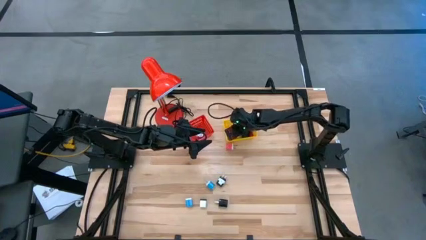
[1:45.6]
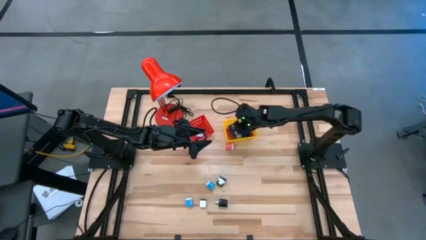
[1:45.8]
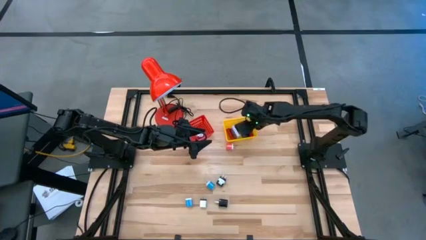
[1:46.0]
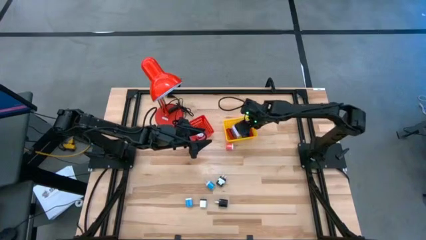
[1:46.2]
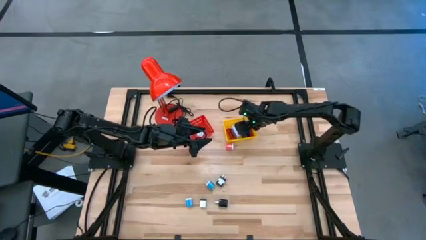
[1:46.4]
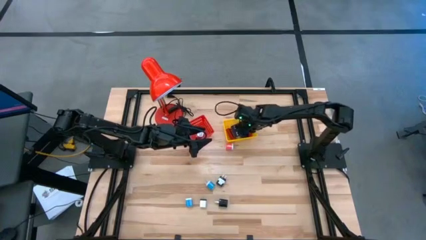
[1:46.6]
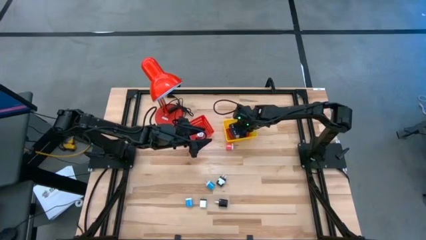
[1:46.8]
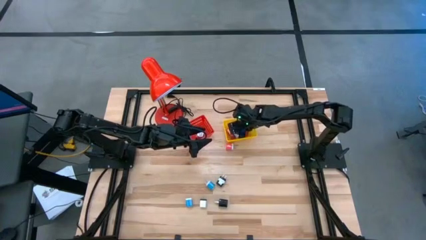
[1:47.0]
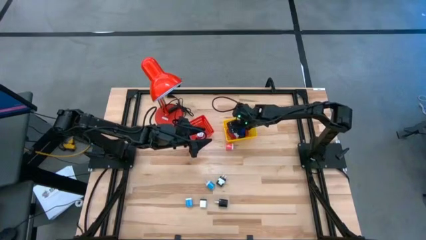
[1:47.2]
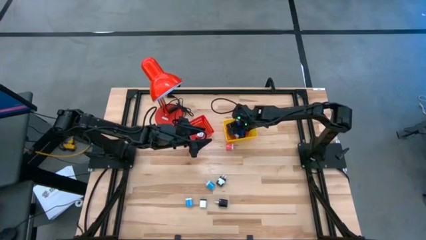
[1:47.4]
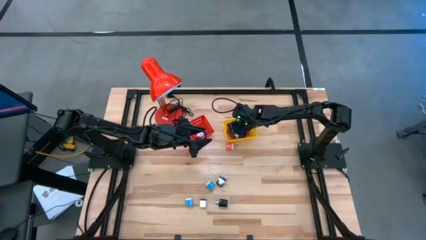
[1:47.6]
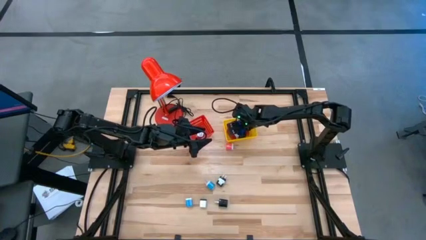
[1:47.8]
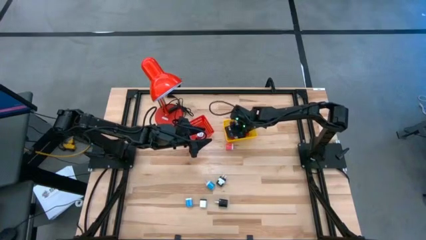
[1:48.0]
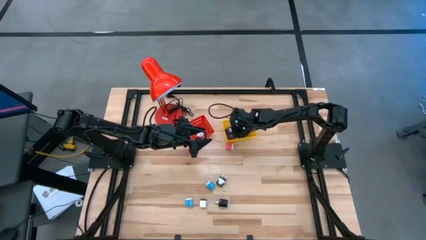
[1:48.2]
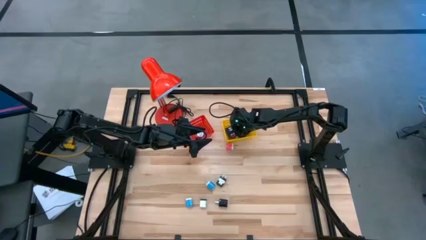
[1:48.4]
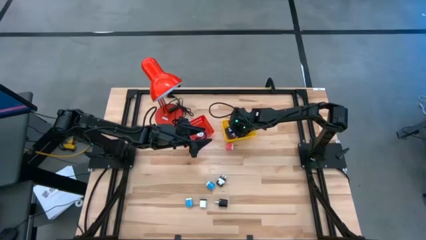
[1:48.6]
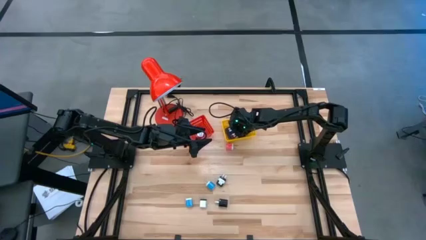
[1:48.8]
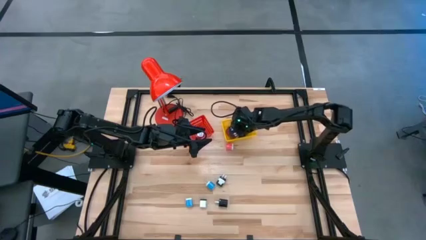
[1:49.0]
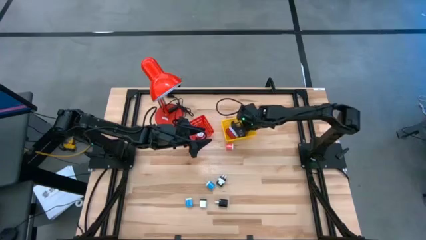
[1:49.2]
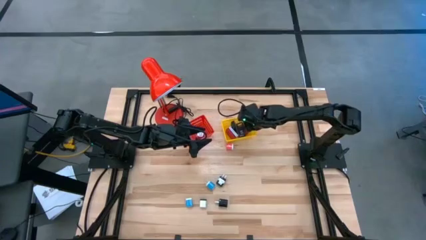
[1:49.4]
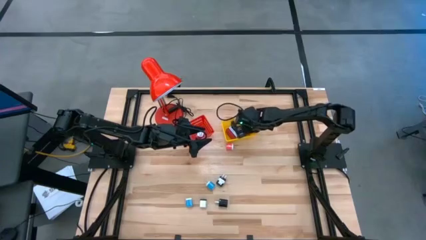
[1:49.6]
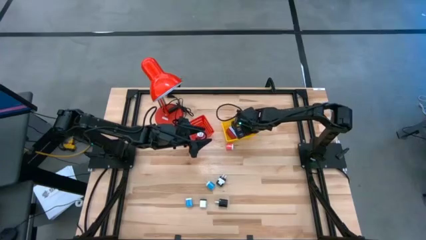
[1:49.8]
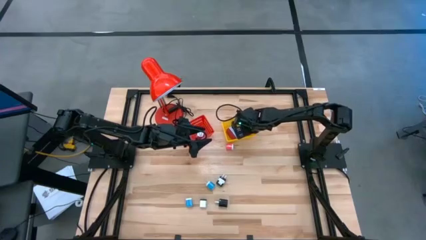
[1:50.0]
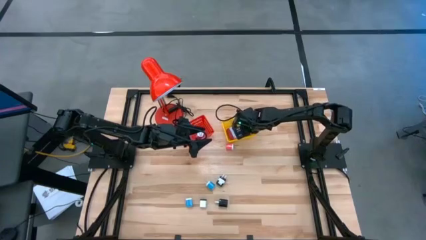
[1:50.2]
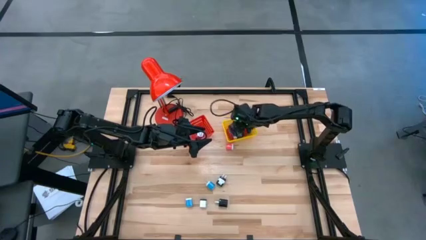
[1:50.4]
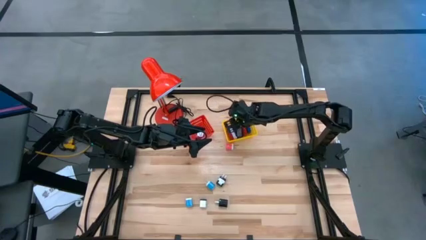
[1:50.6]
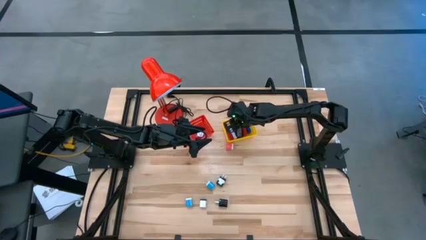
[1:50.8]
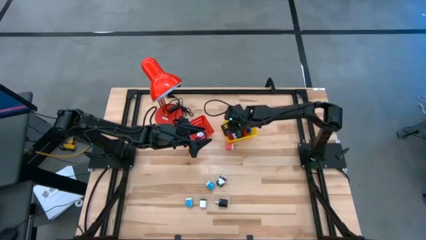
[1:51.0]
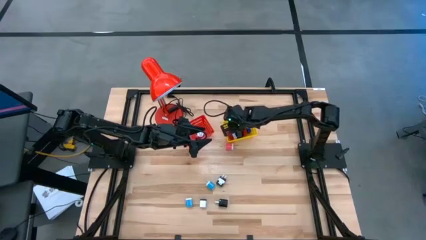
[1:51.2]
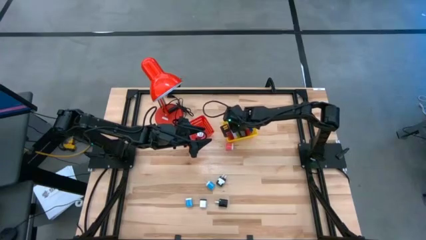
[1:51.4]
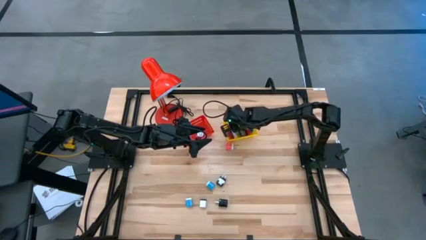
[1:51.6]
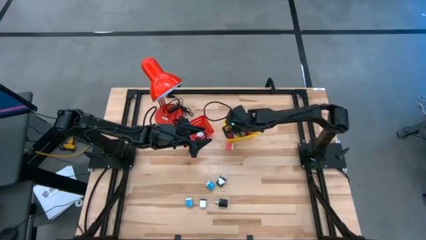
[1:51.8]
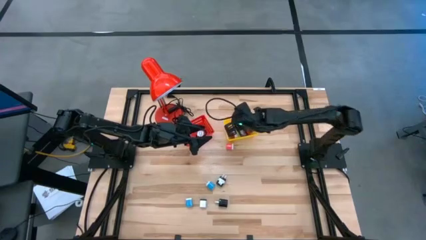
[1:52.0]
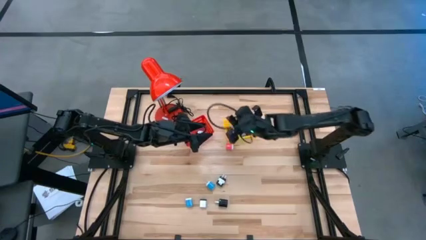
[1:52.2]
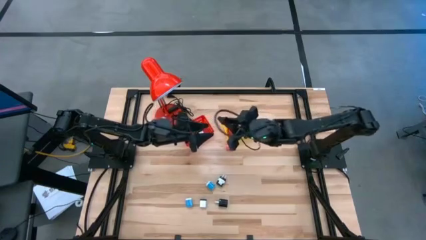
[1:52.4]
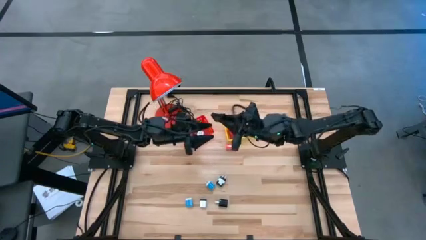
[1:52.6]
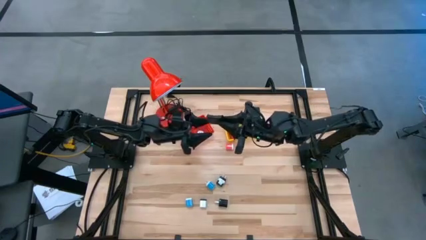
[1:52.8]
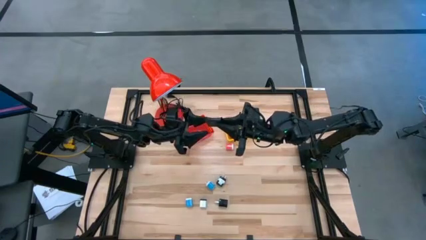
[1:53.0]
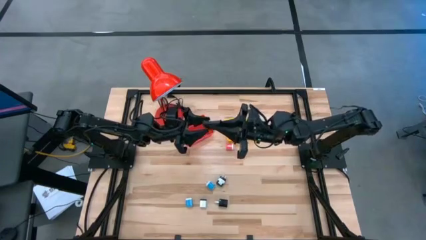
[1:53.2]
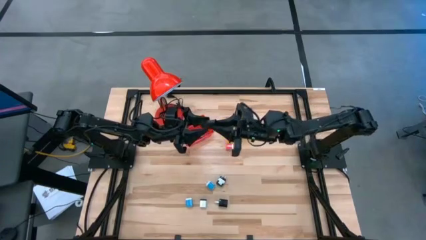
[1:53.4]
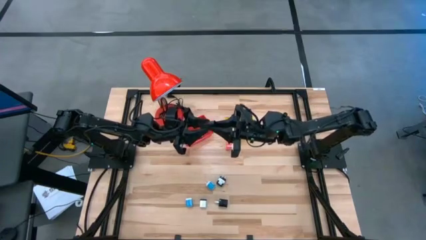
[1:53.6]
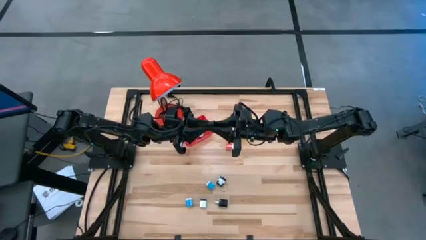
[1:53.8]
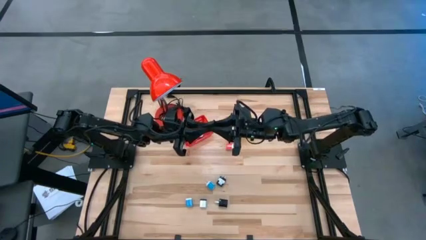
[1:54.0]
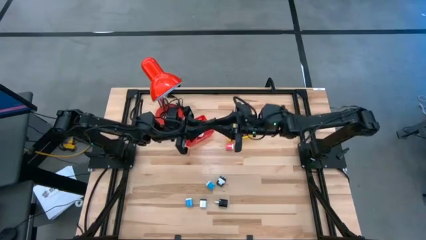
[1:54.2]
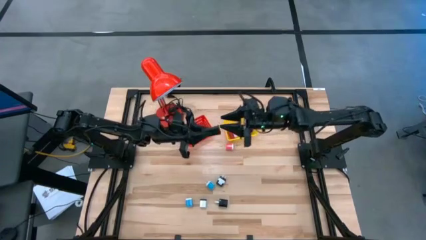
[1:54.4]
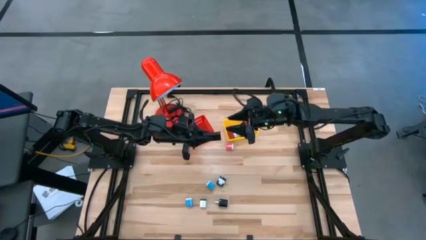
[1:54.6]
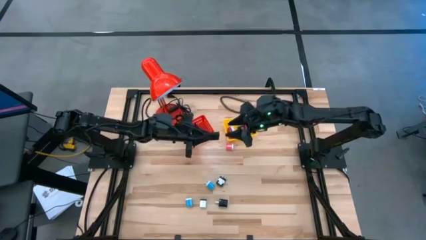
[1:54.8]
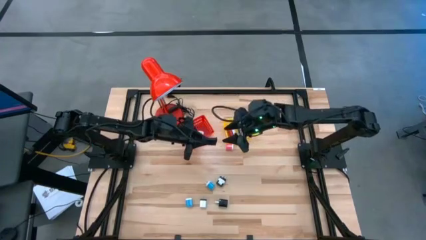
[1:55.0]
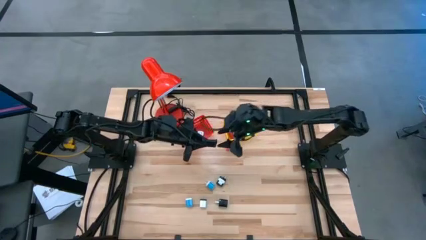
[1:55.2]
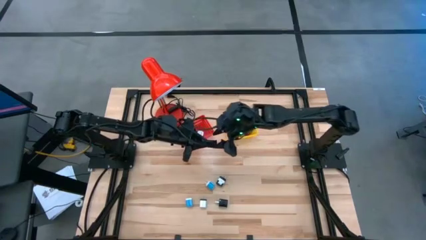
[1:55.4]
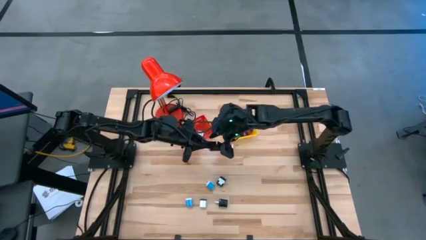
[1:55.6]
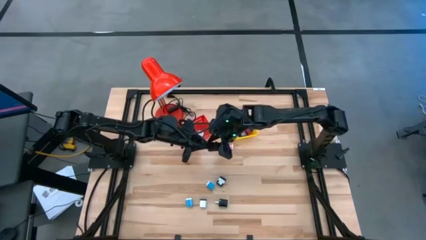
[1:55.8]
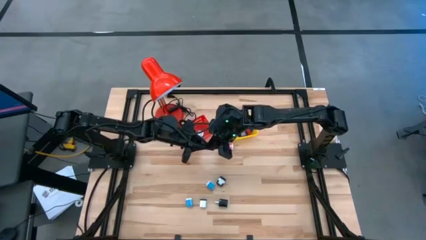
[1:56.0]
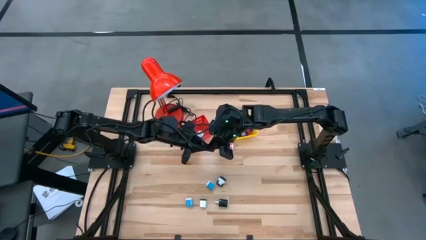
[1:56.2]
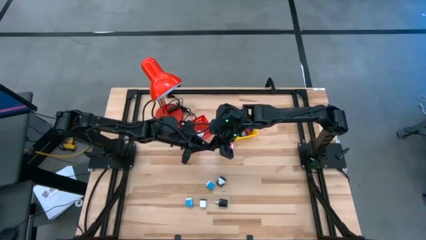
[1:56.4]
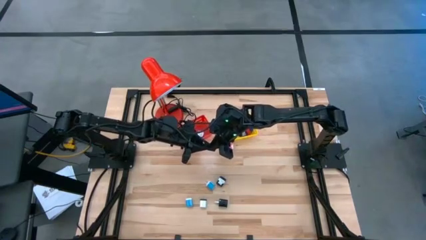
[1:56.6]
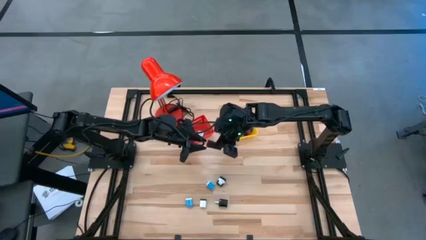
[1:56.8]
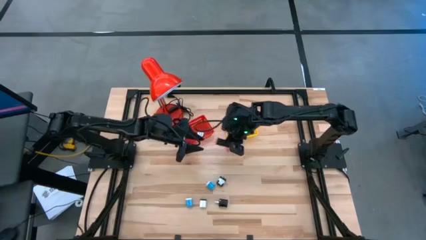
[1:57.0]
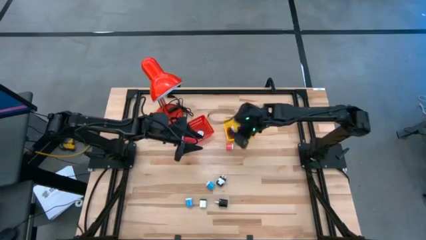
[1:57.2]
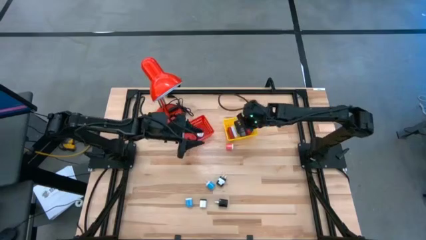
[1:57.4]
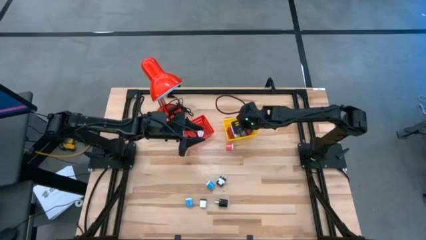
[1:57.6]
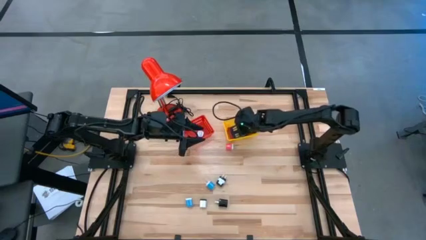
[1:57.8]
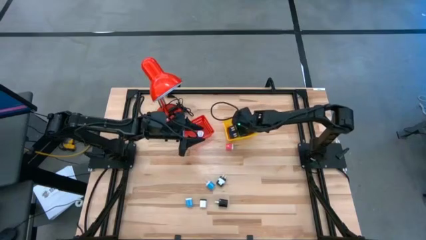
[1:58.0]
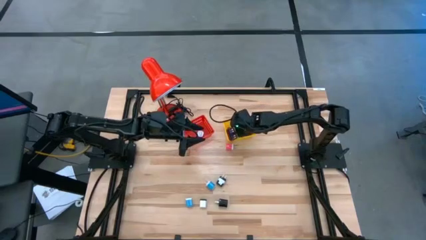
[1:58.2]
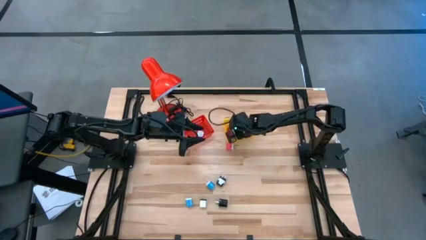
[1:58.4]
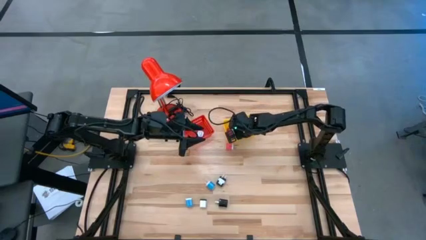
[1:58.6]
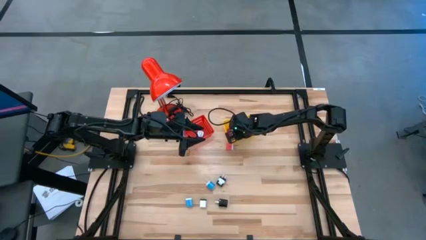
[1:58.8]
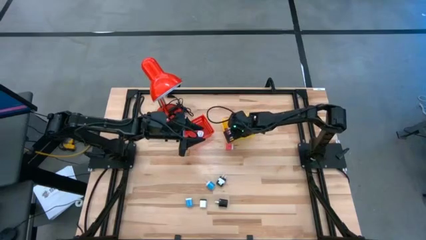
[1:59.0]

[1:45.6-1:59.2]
Task: Pick & Place Office items
Adjust the digital timers in the yellow bin
